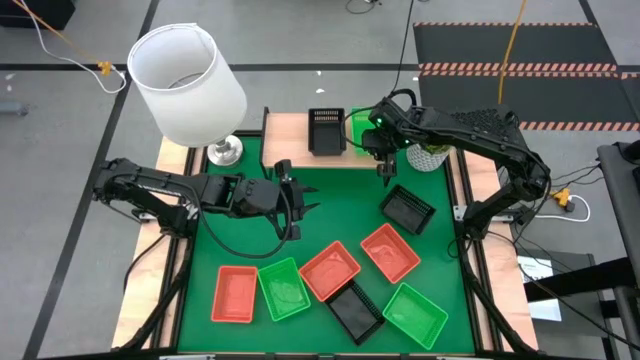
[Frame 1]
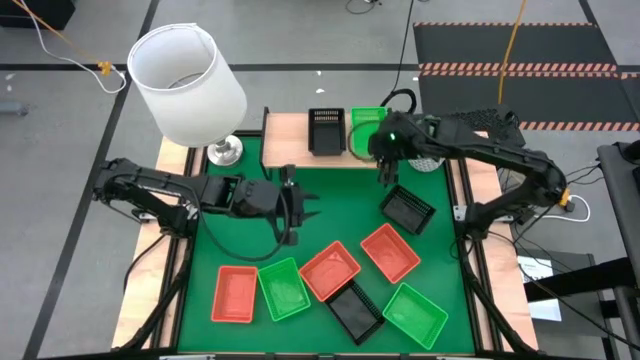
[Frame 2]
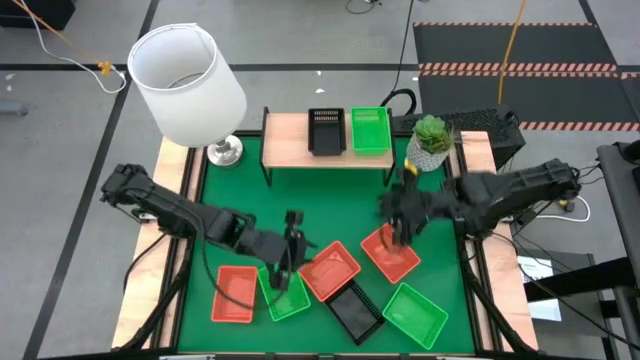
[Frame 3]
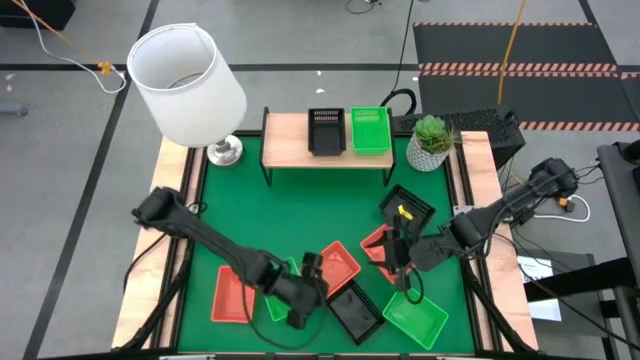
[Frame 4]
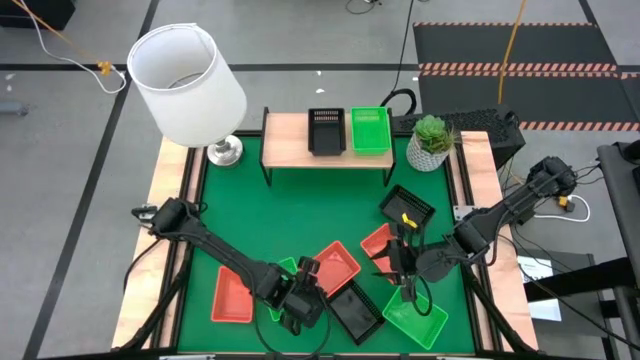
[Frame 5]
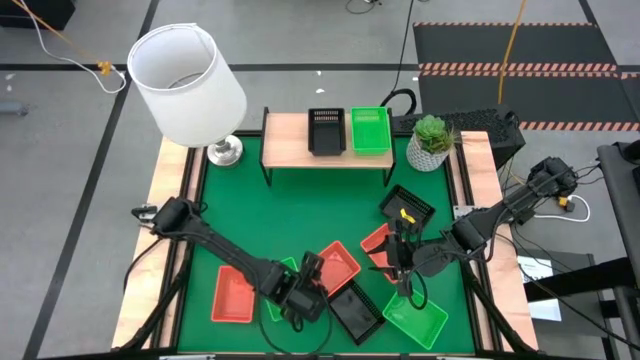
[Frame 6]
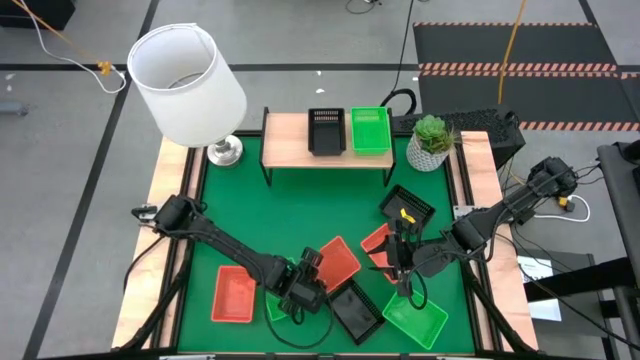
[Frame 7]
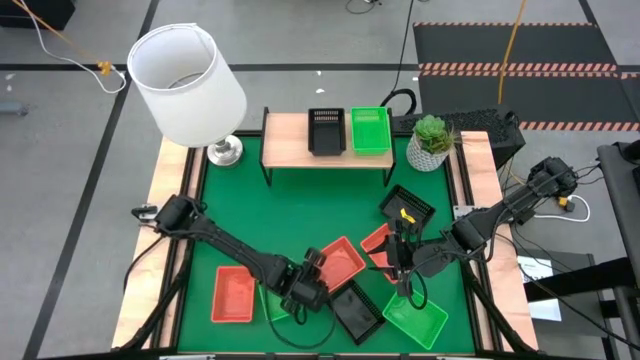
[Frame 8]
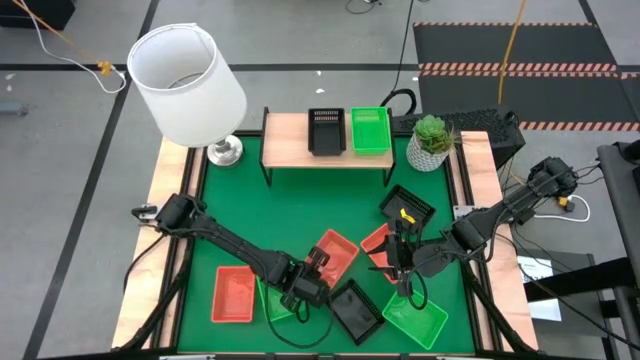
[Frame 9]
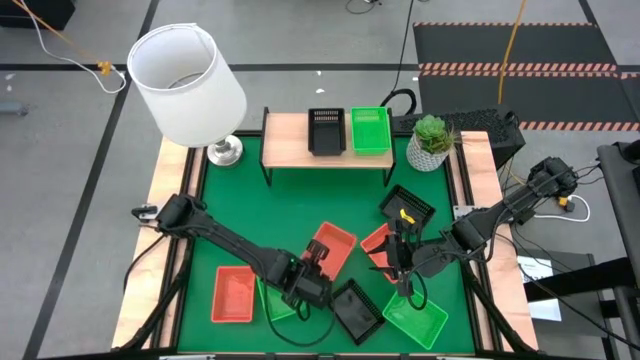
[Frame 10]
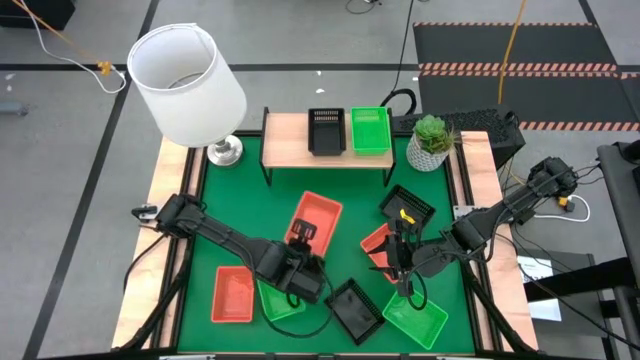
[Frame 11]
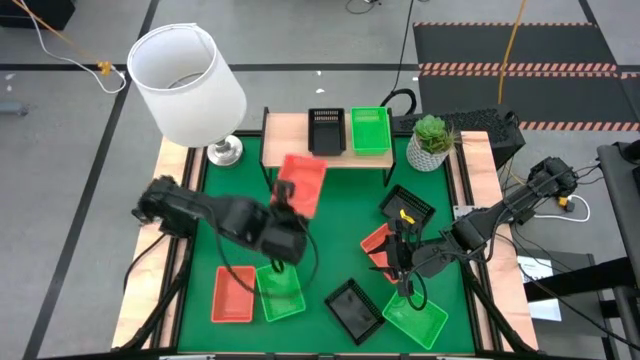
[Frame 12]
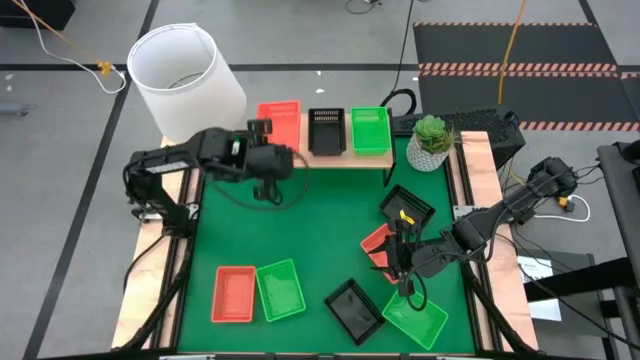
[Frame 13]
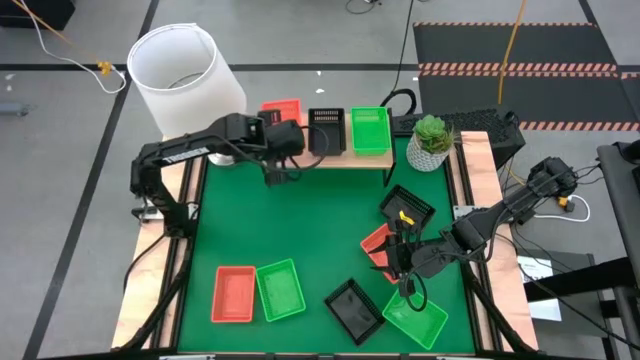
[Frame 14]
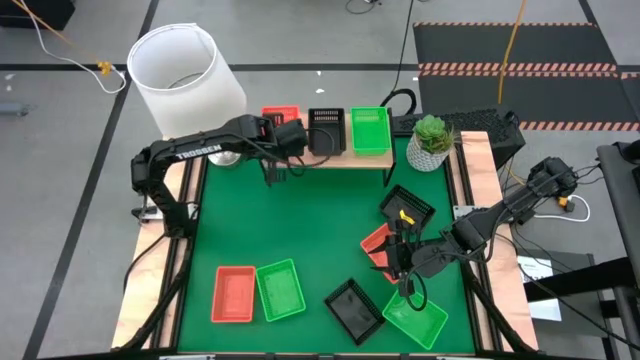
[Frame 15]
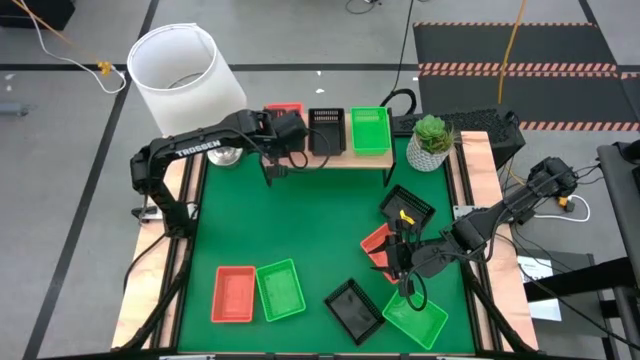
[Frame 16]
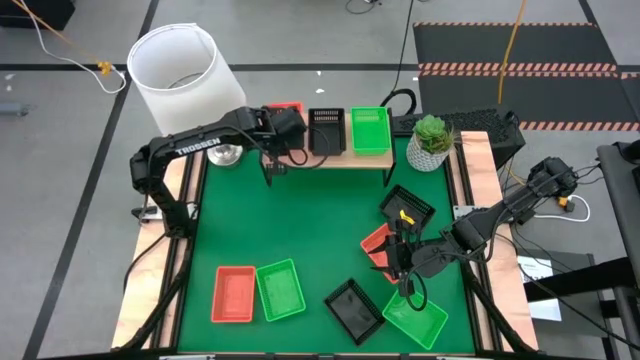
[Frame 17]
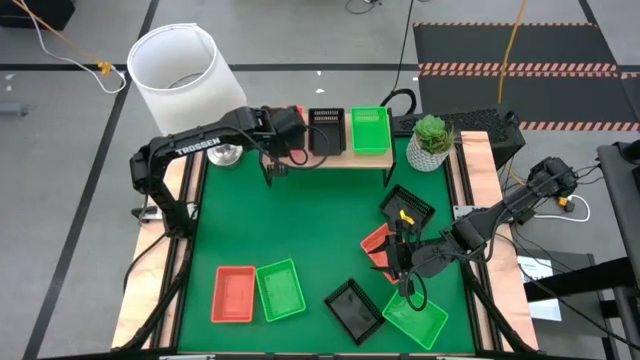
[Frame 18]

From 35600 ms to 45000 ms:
Task: Stack baskets on shelf by color
Put the middle orange basket on the shelf

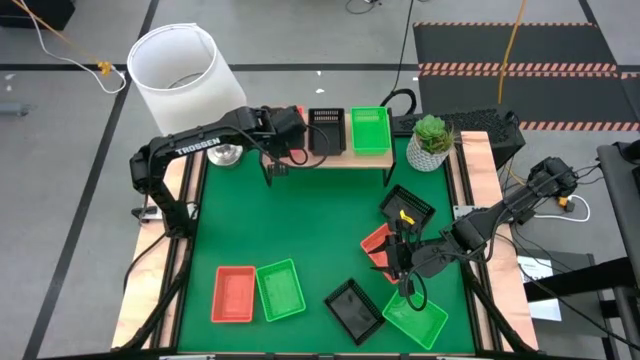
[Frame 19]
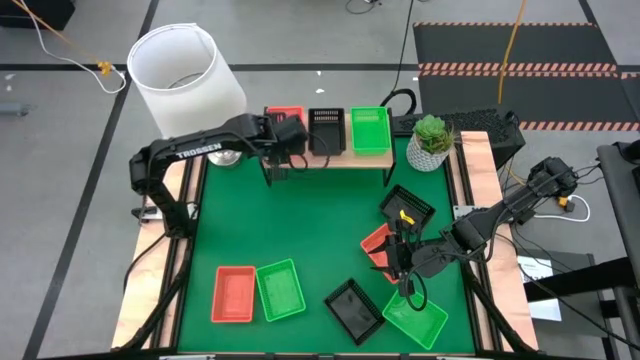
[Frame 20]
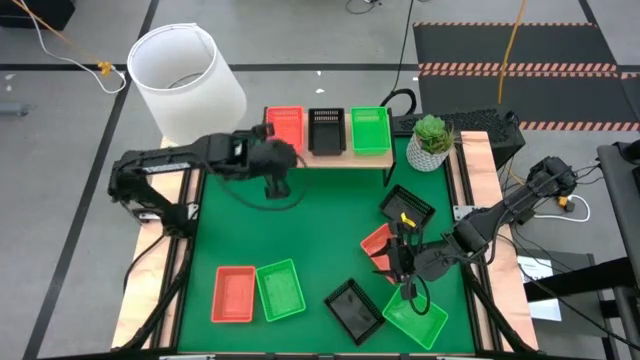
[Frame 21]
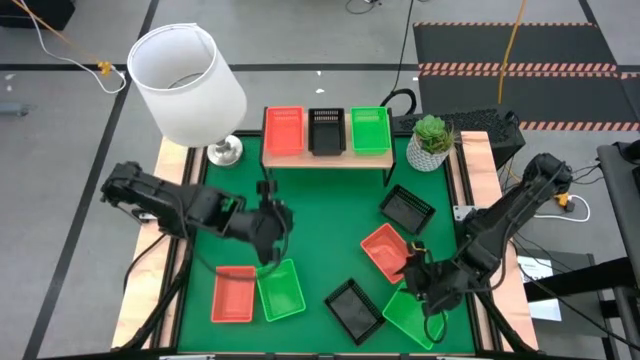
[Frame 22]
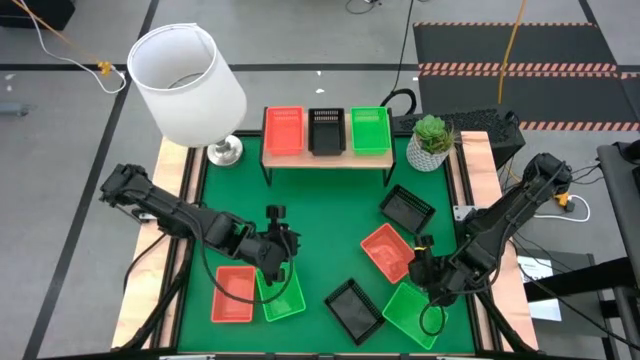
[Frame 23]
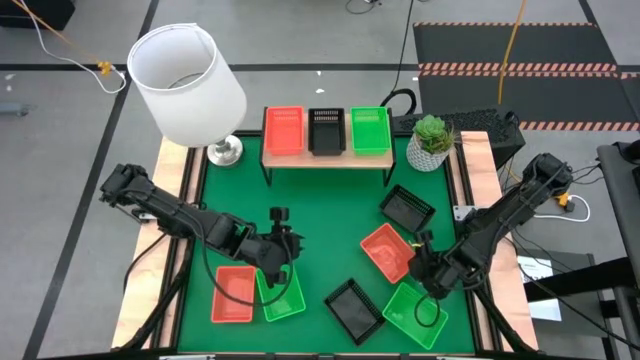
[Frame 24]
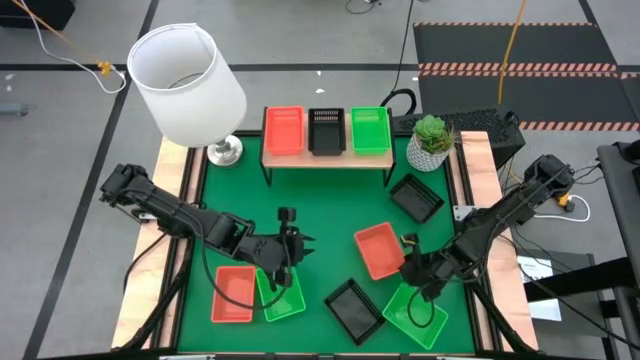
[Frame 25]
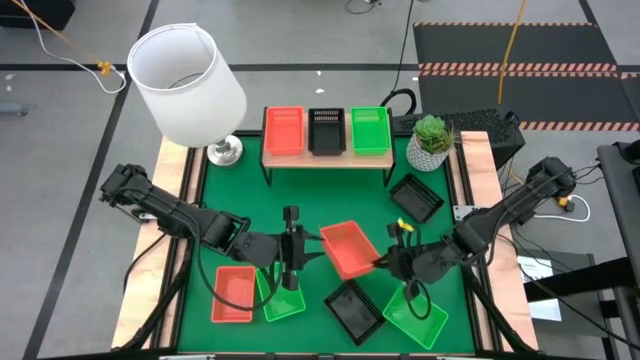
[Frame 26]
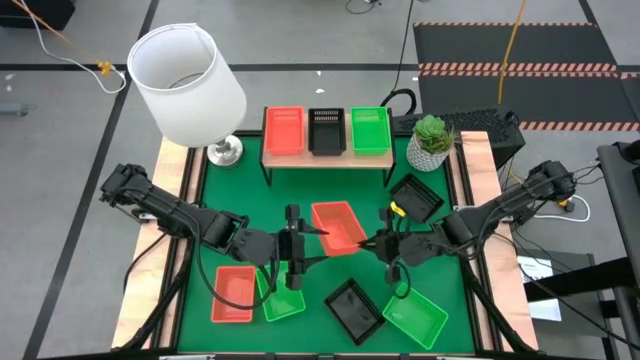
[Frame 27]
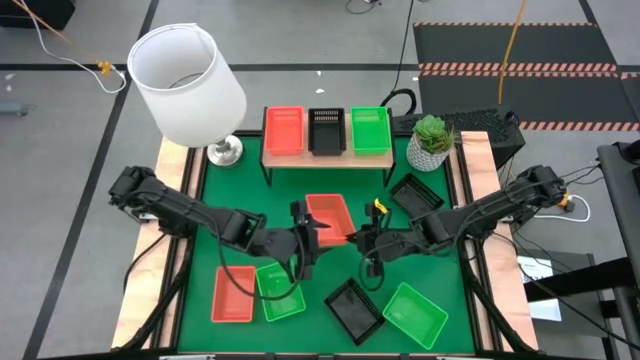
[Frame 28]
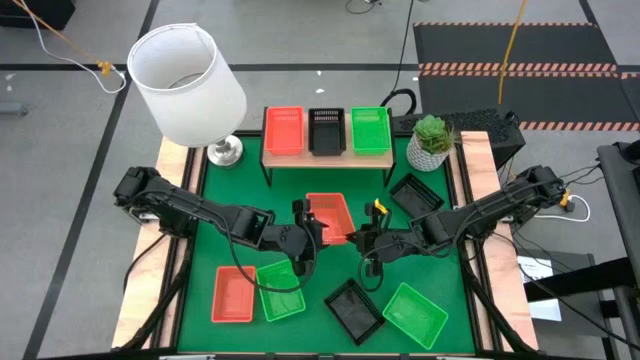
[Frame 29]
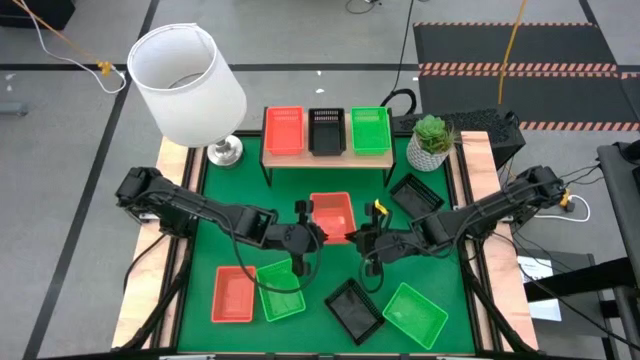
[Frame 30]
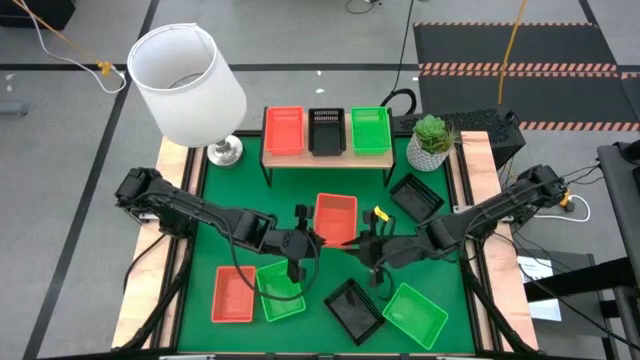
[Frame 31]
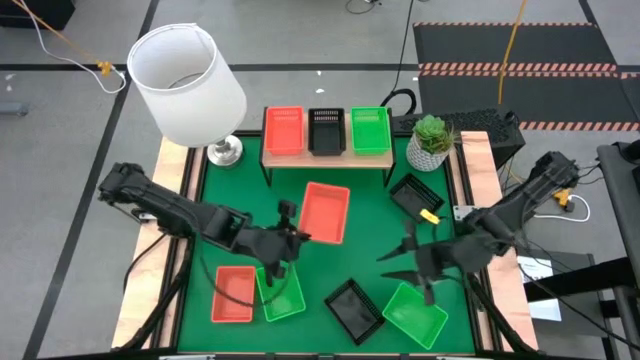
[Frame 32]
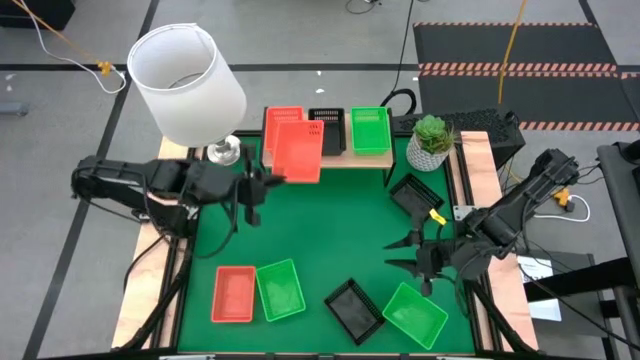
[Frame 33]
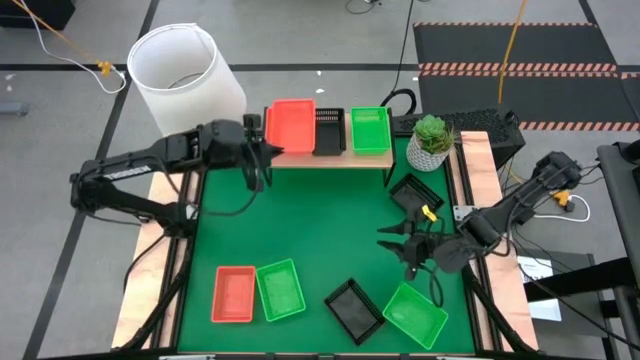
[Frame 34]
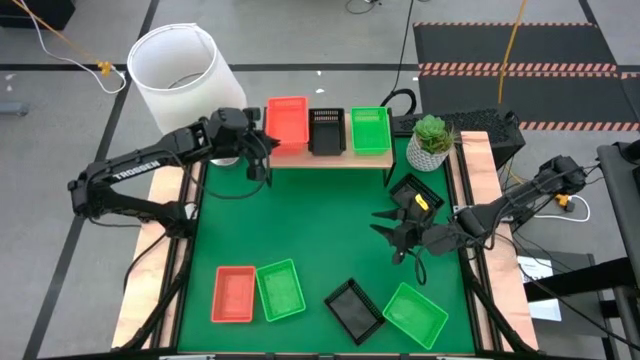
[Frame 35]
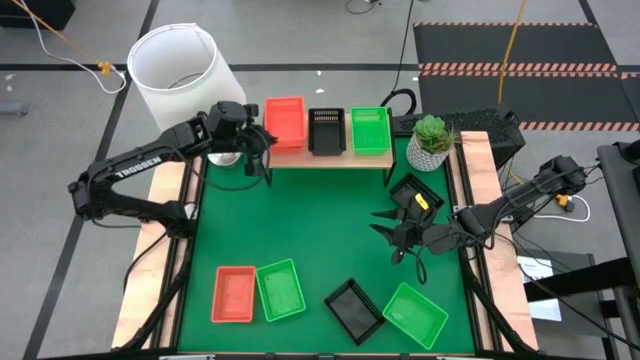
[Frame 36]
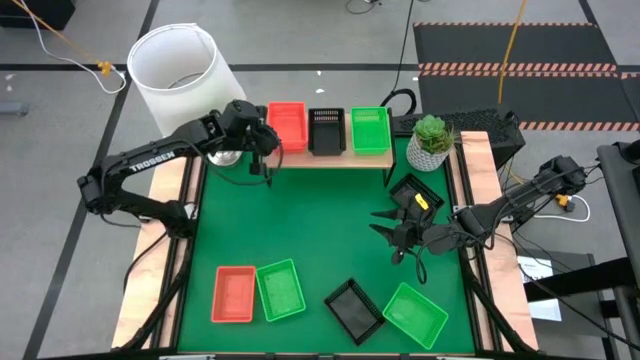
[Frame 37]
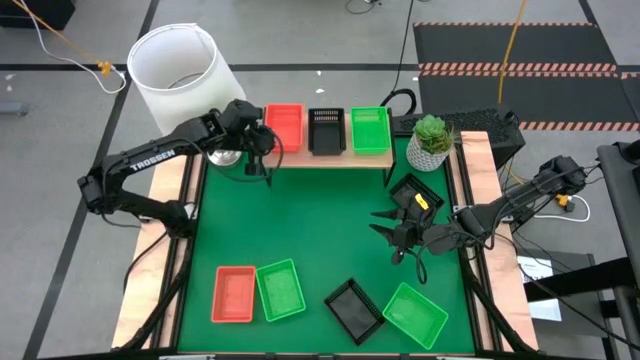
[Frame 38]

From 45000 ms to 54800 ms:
Stack the right orange basket into the orange basket on the shelf

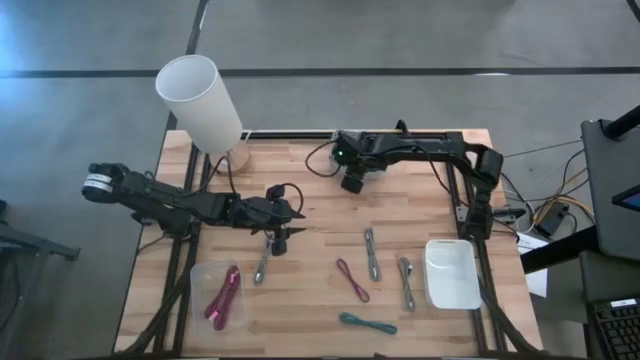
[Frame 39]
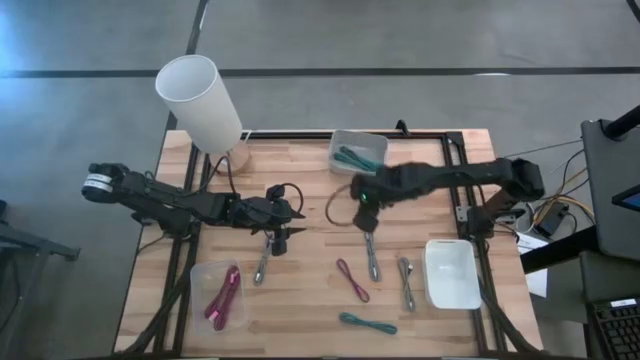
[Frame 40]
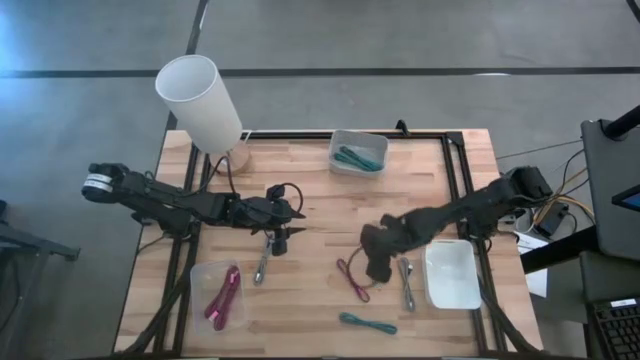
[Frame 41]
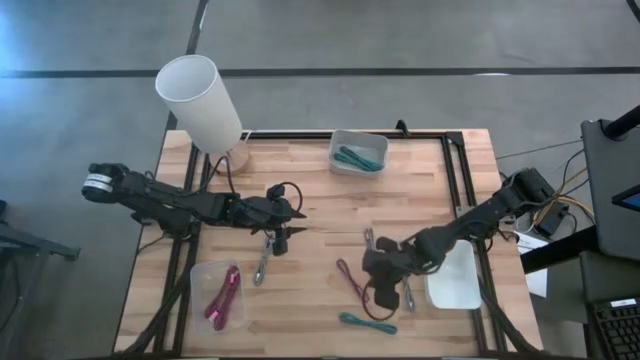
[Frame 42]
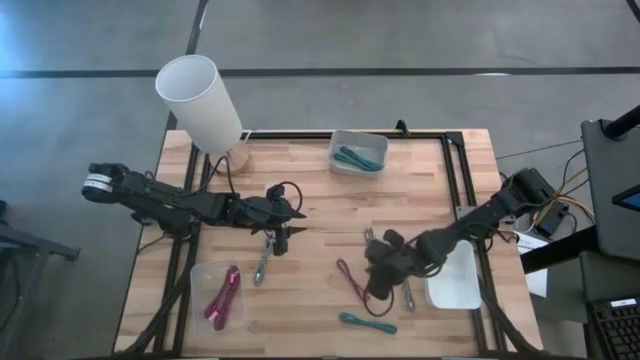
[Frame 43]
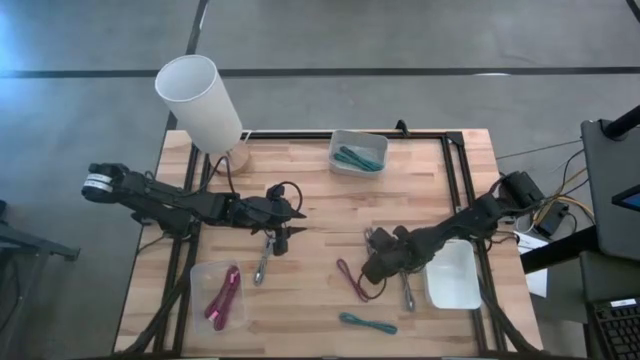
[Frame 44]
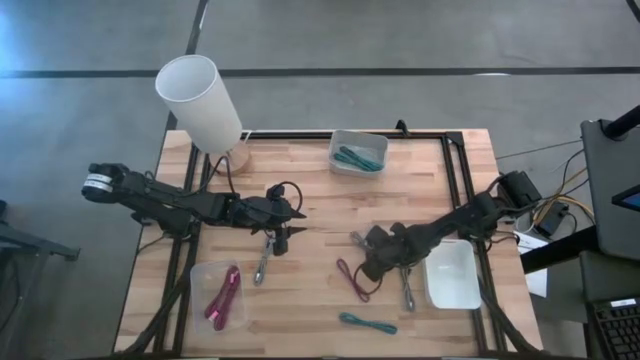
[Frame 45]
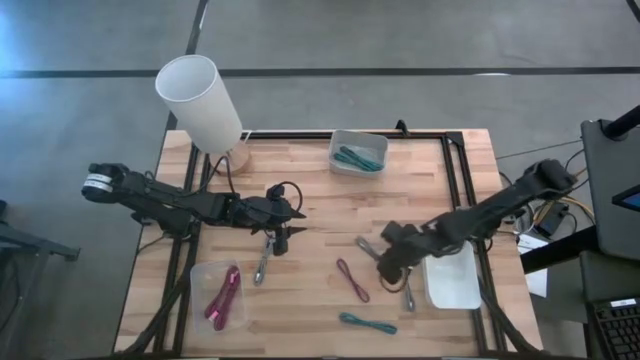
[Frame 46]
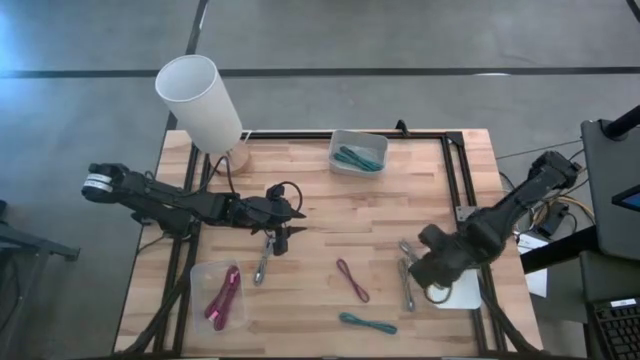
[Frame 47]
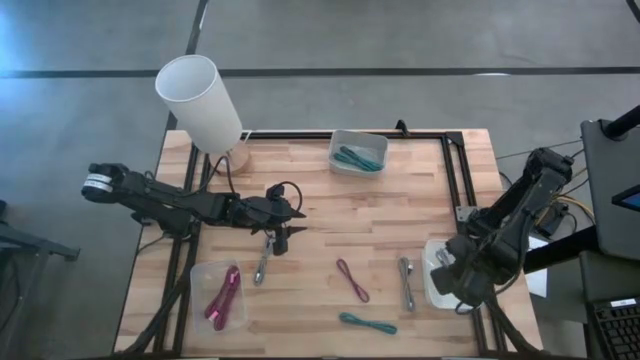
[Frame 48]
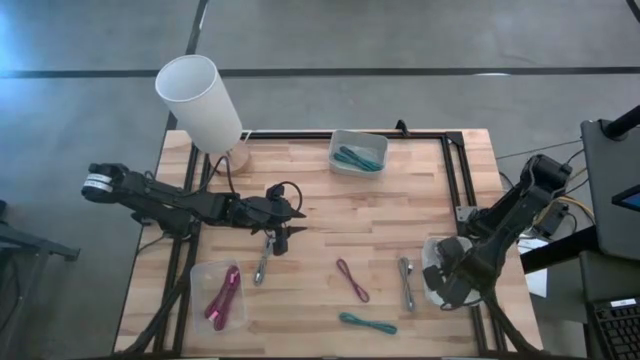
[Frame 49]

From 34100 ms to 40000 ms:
Task: Pick & Place USB Port
Put the middle white striped charger cable into the white striped bin
